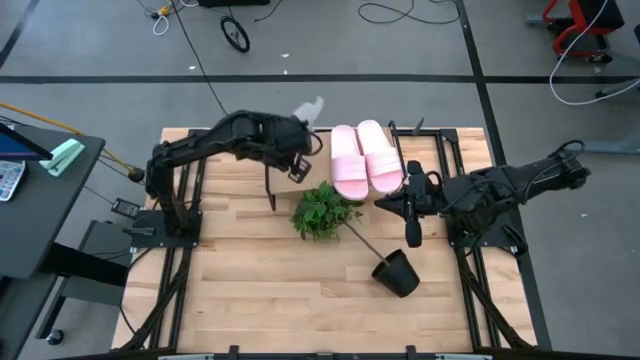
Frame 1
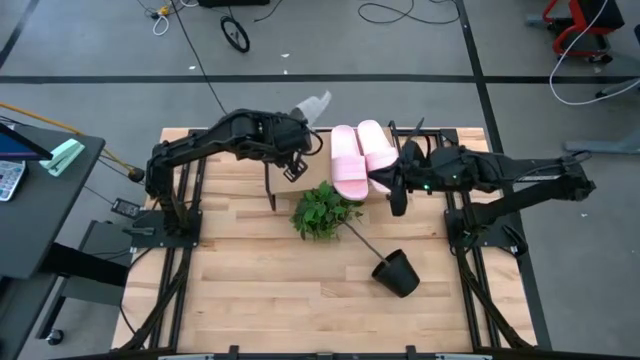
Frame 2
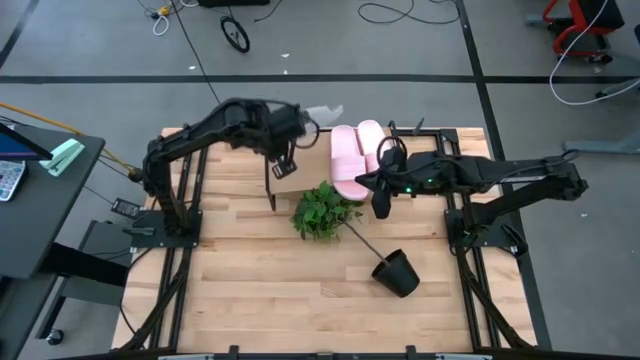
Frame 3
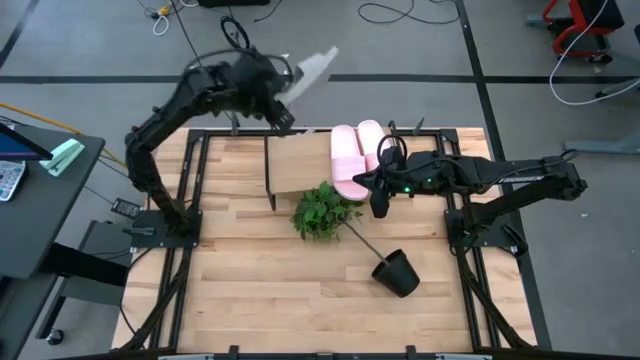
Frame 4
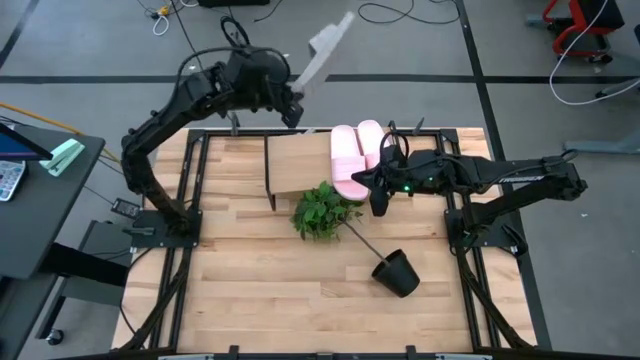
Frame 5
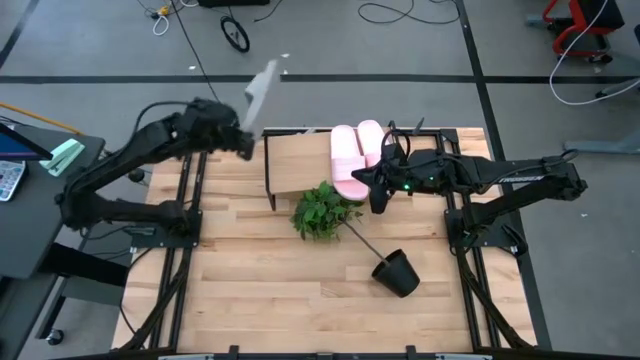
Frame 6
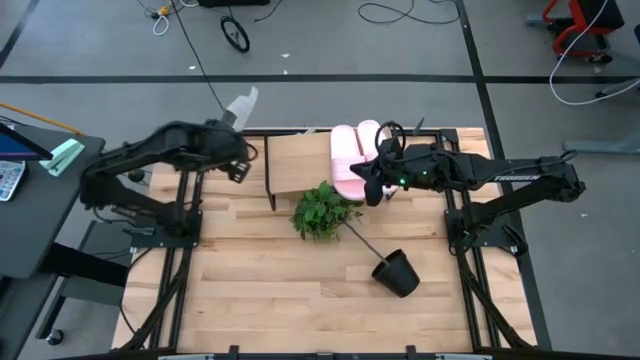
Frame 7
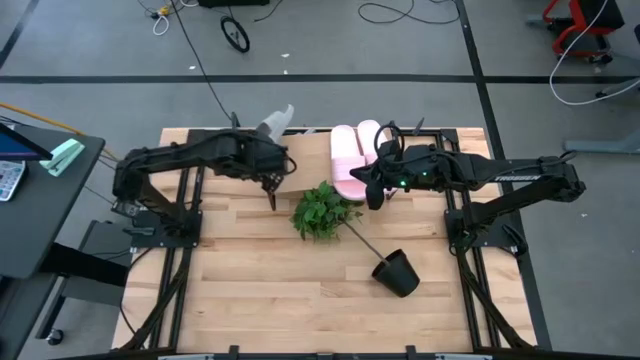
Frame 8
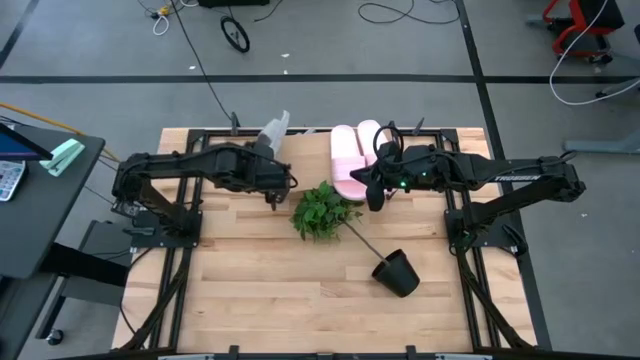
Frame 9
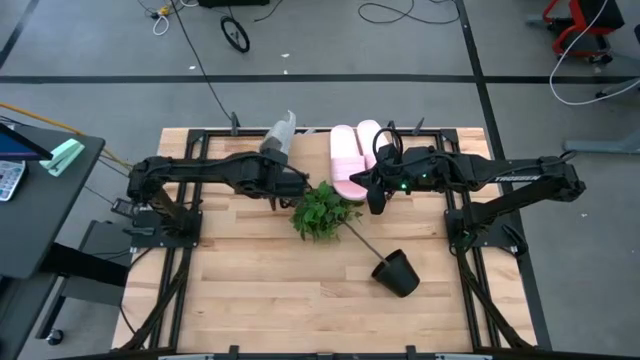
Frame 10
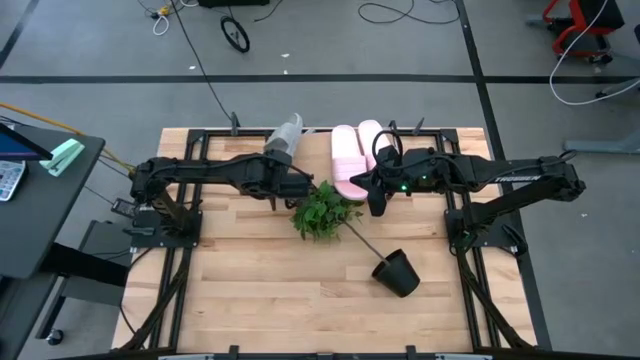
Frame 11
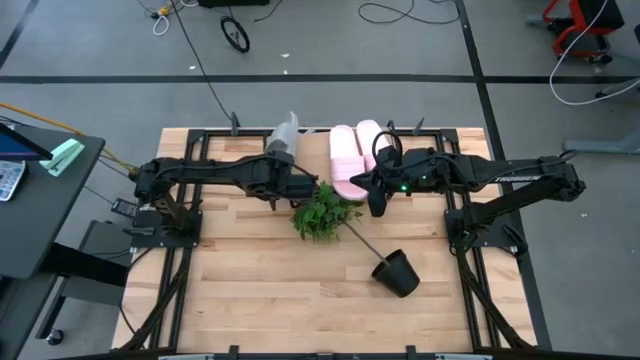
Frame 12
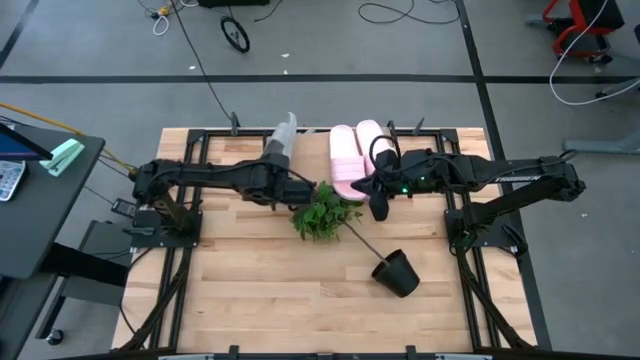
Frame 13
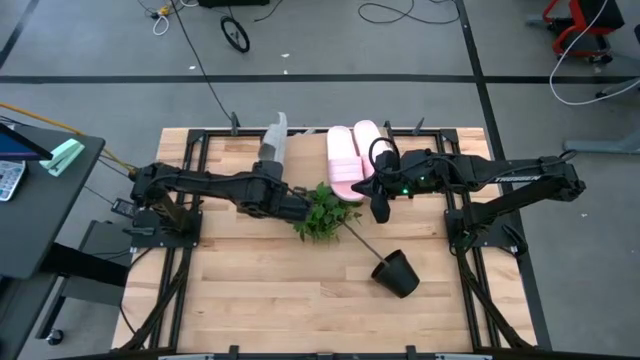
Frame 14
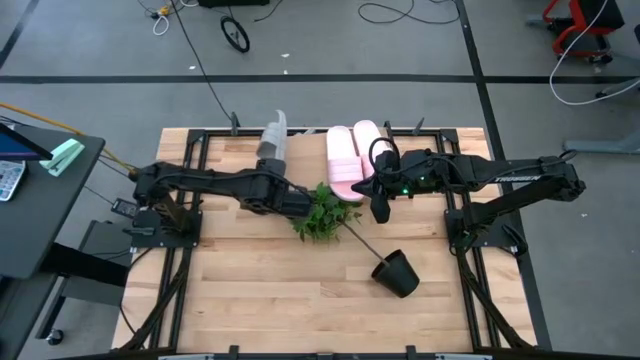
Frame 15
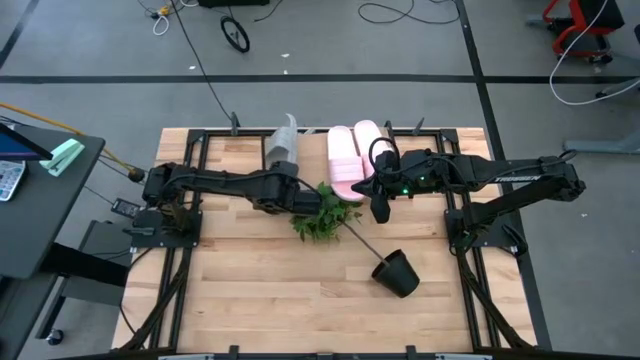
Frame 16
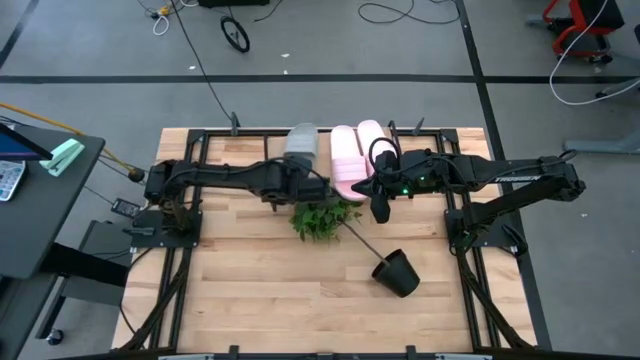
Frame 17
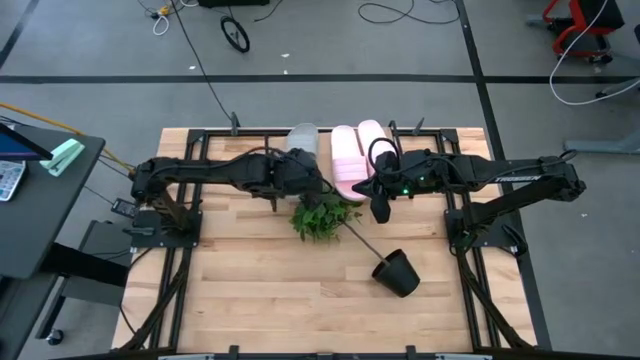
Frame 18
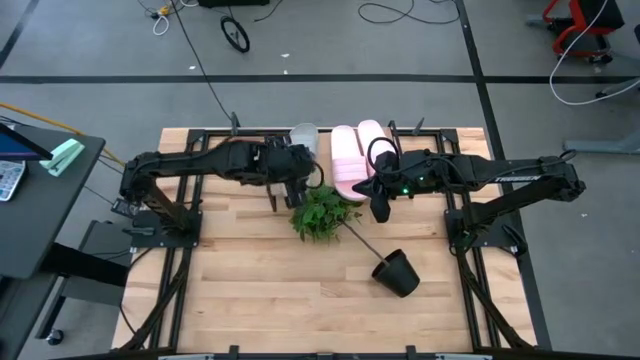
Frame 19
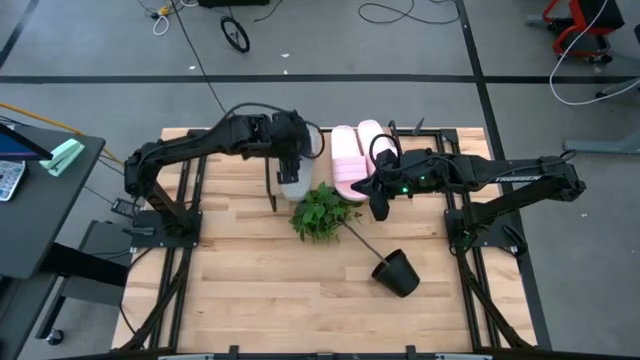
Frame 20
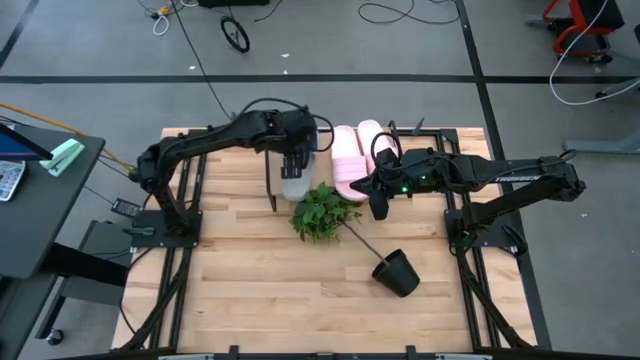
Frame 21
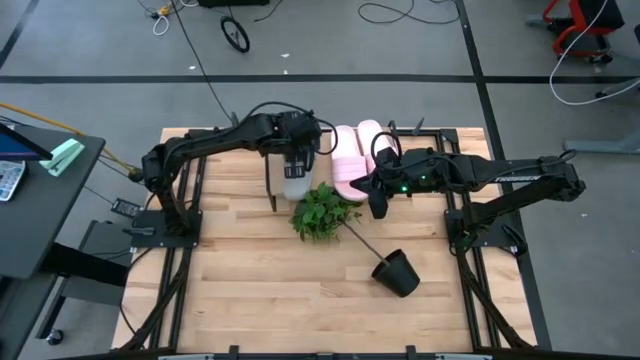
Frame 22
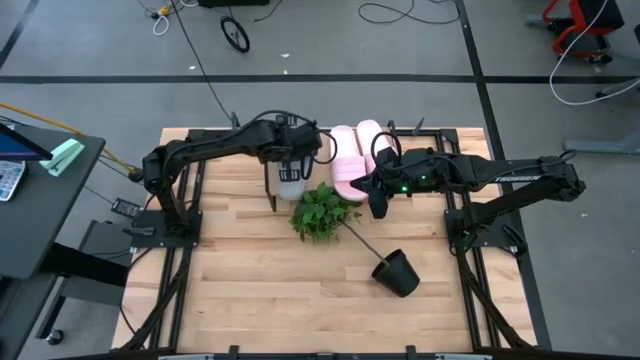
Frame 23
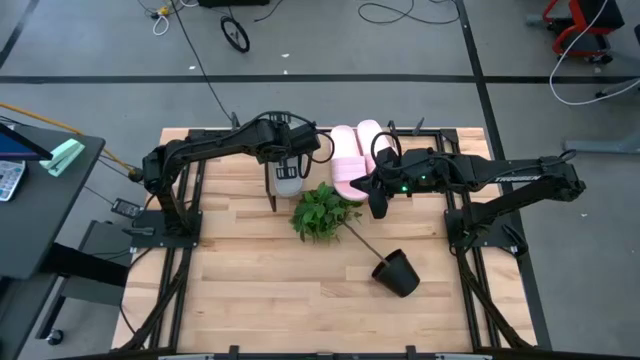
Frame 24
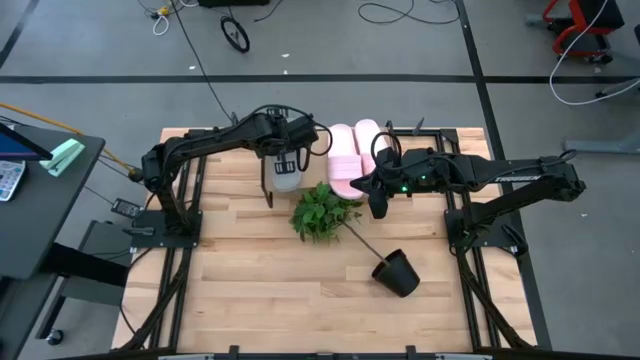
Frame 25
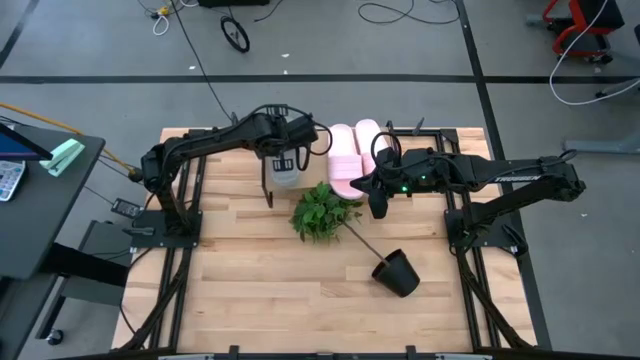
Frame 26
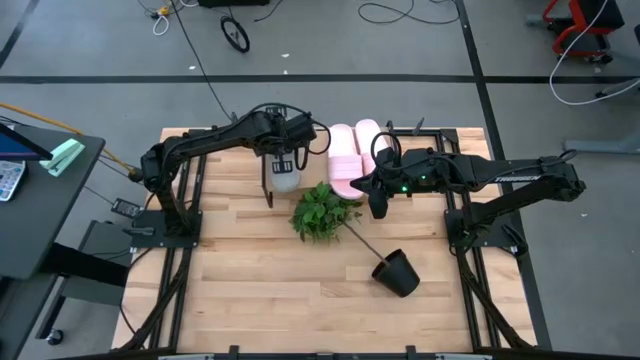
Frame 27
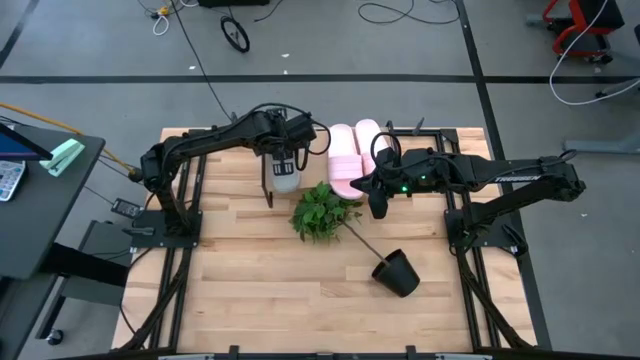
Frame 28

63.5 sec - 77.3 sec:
Task: Pick and place slides into the shelf
Put the bottom gray slides on the shelf

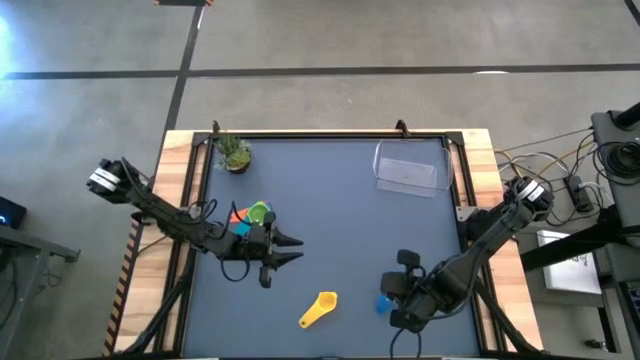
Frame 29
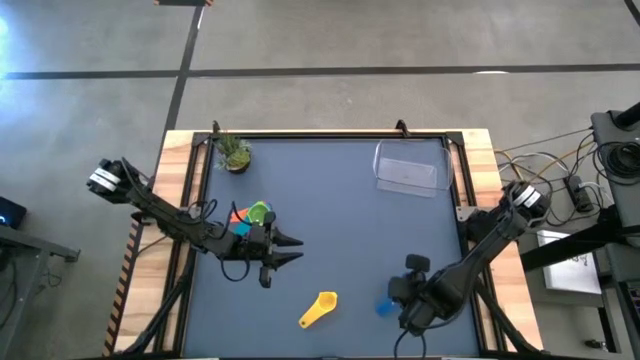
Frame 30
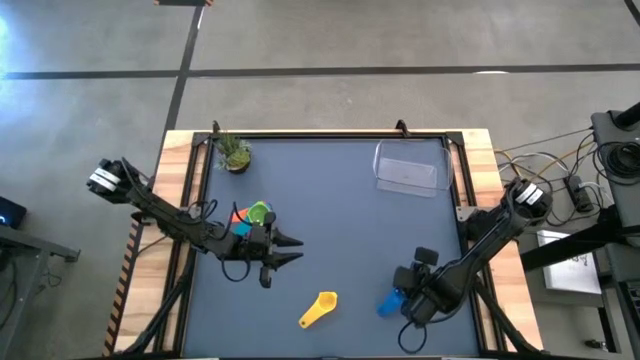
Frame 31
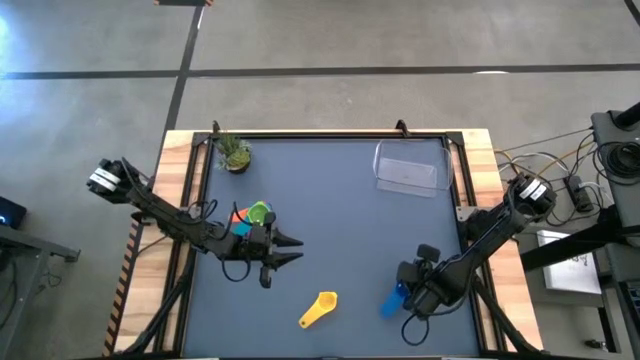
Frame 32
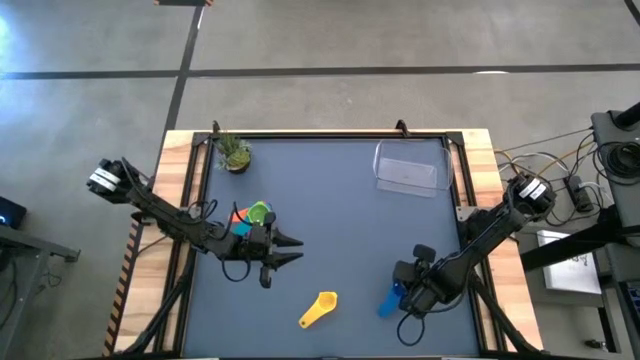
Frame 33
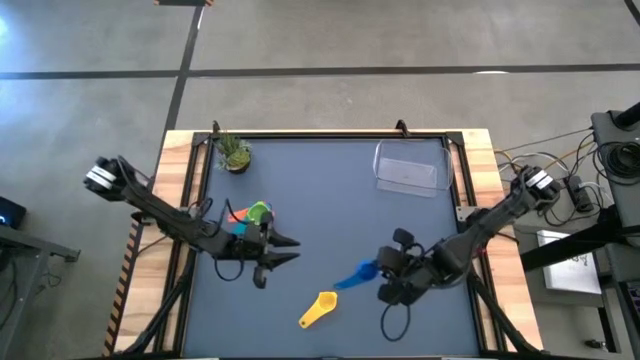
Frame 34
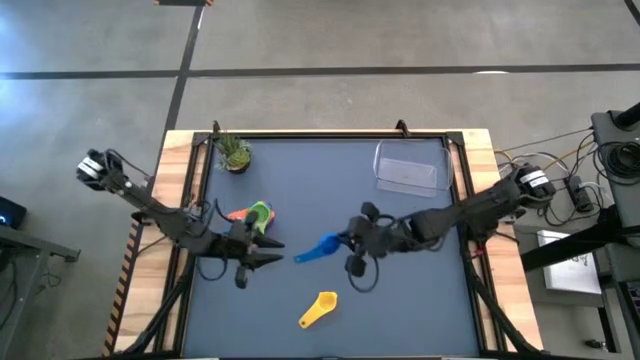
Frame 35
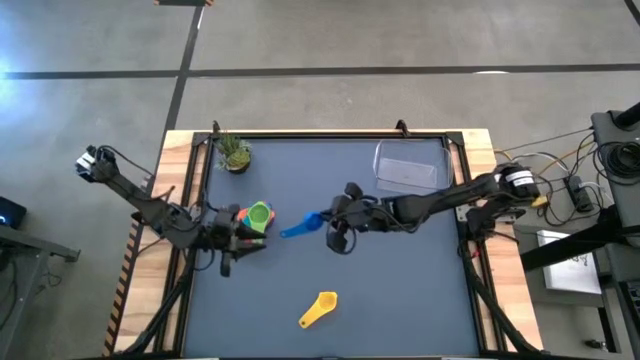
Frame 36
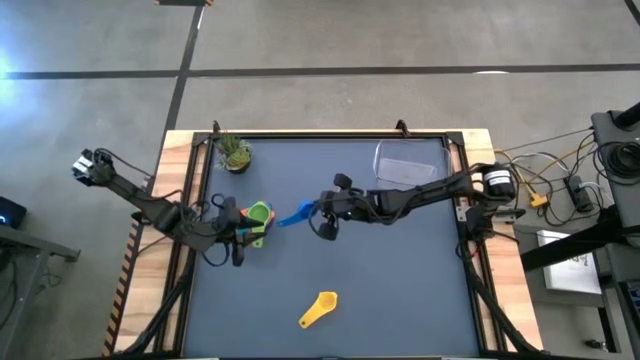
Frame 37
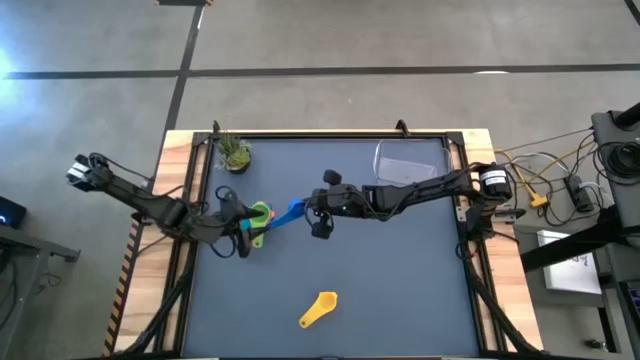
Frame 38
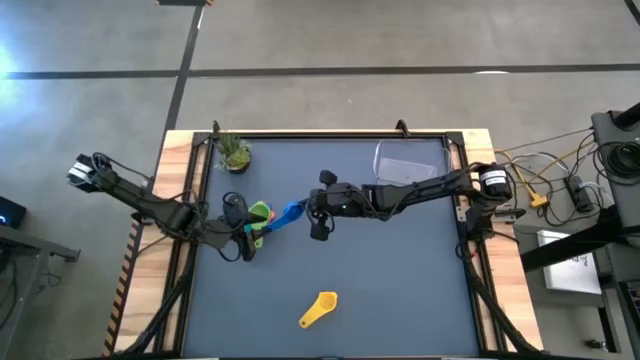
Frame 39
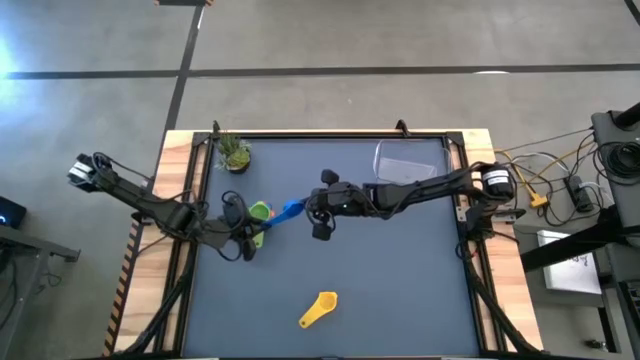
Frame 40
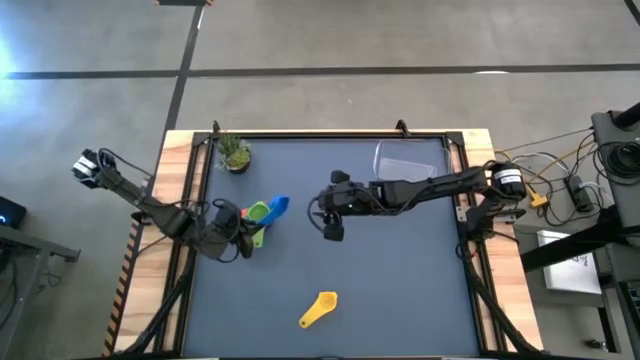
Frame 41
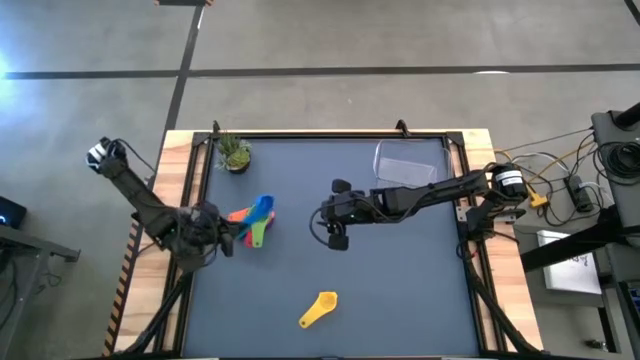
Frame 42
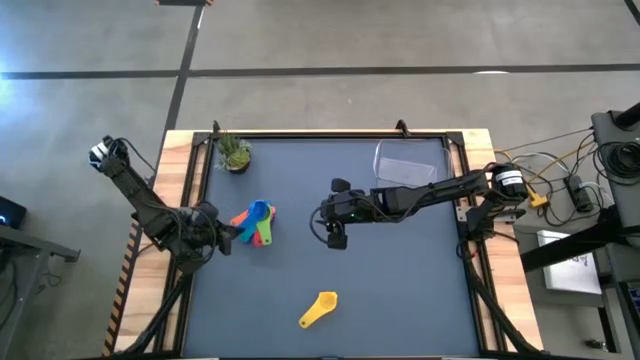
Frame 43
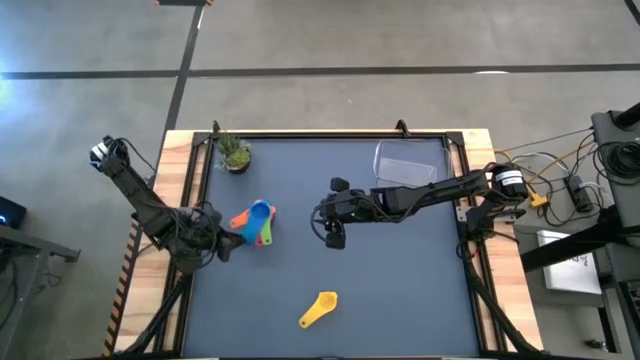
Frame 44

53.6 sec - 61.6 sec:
Task: Nest measuring cups in basket
Stack the dark blue measuring cup on top of the green measuring cup

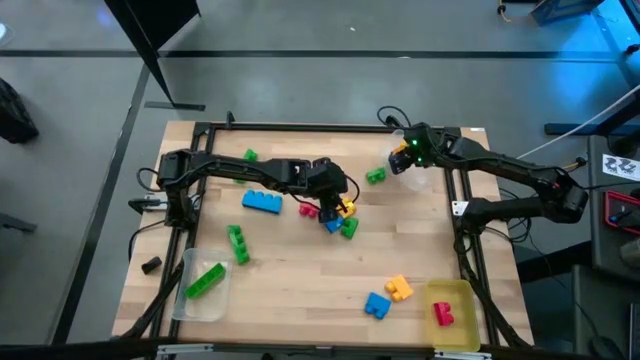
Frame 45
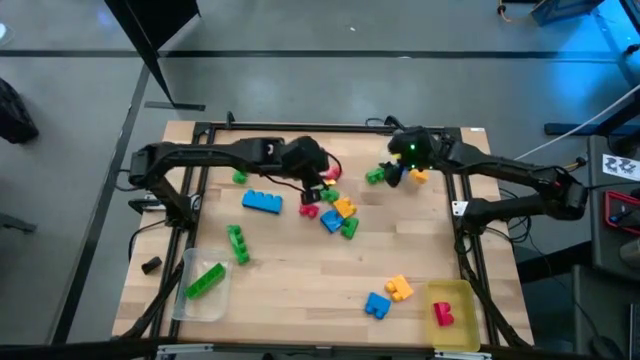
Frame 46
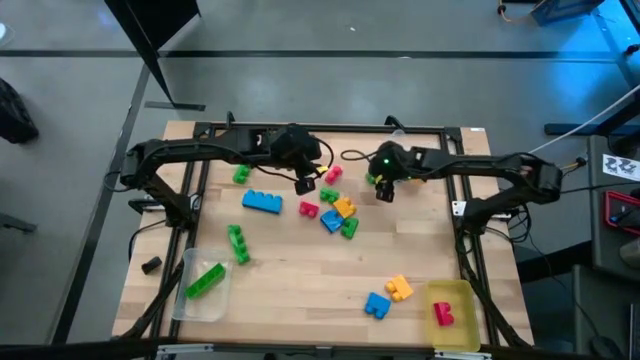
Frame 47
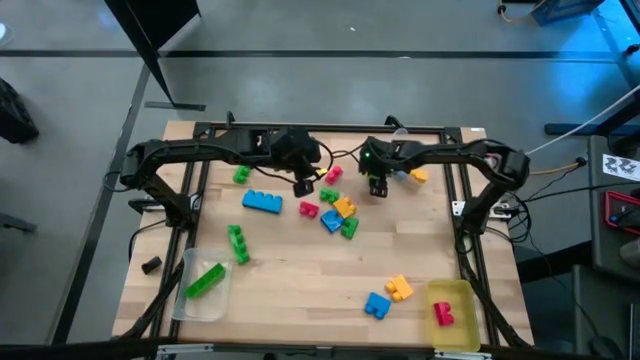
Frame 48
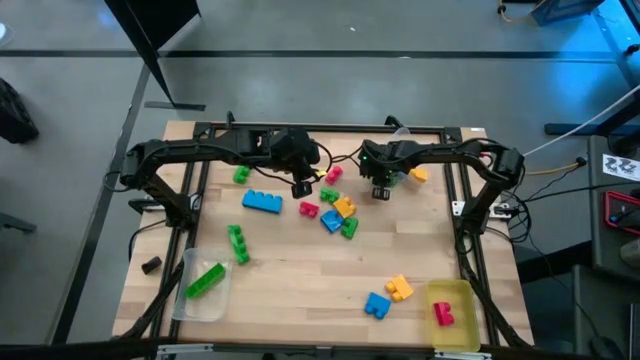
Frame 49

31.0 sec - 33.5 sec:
Task: Sort blocks by size
Put the top right 2 stud green game piece into the yellow bin
